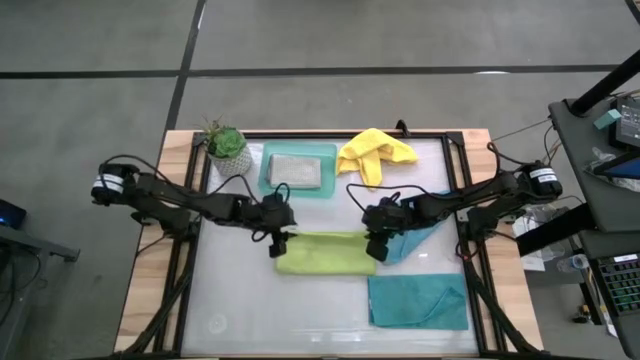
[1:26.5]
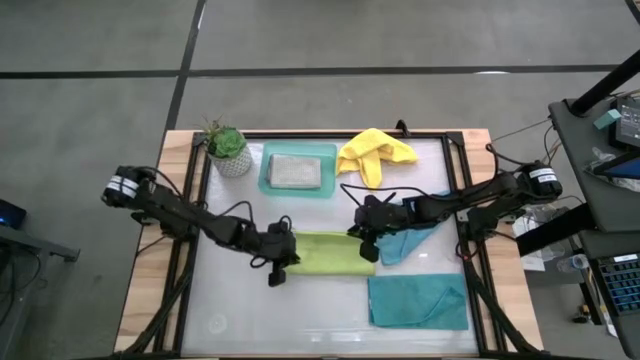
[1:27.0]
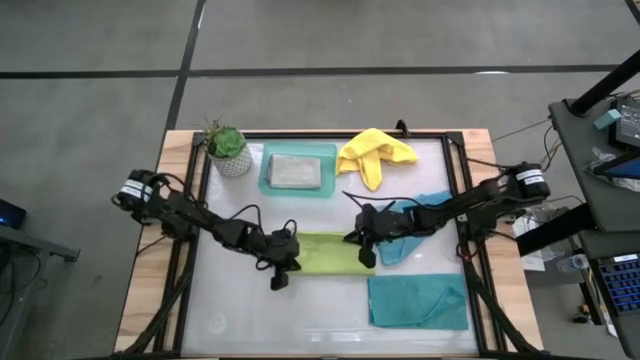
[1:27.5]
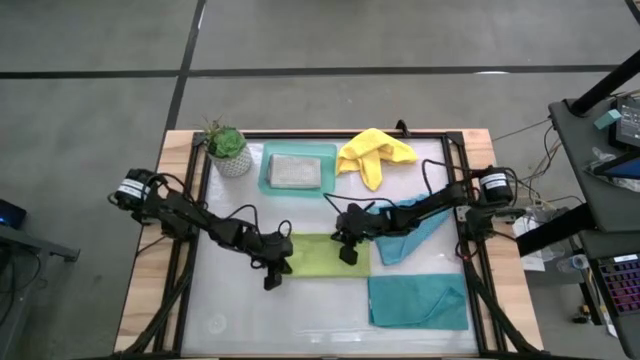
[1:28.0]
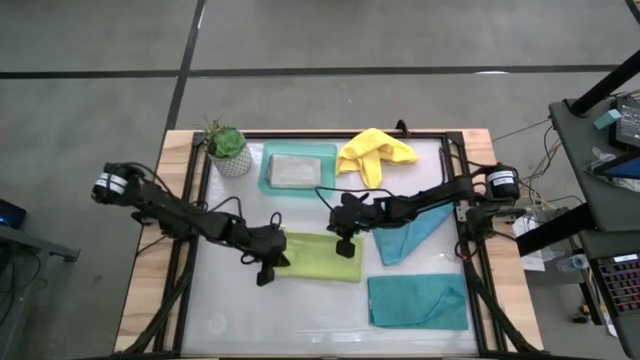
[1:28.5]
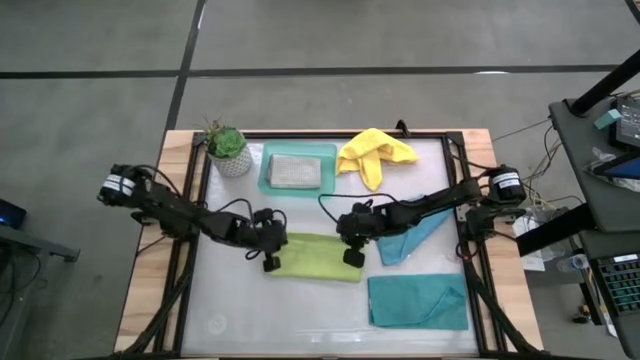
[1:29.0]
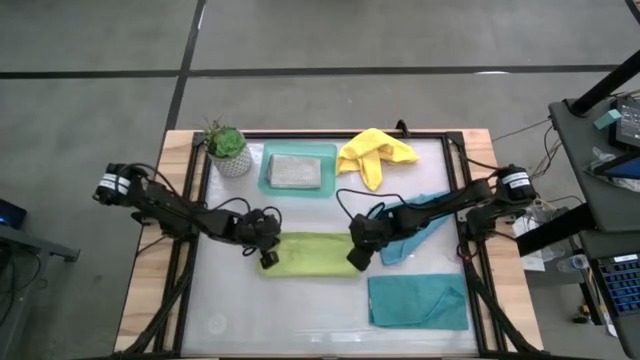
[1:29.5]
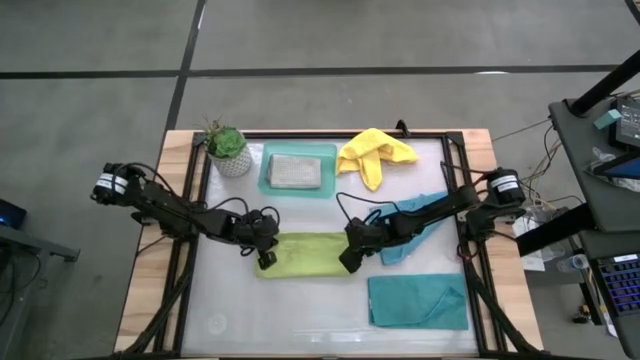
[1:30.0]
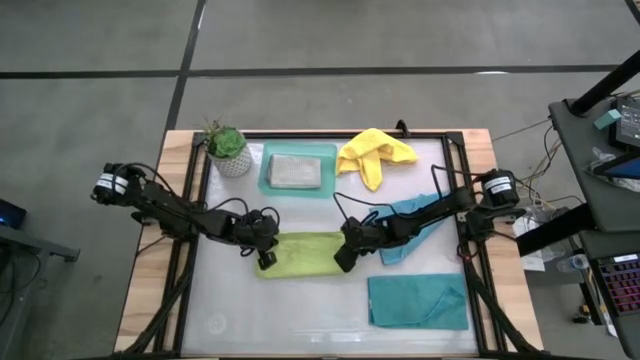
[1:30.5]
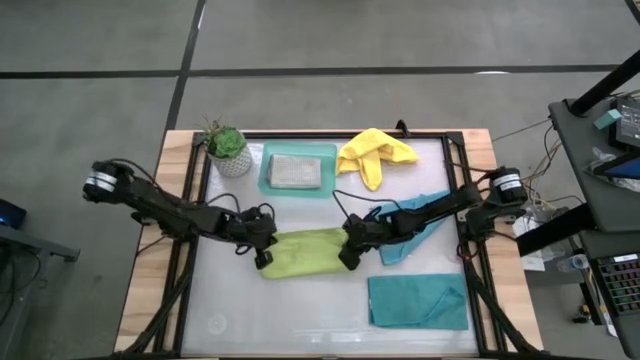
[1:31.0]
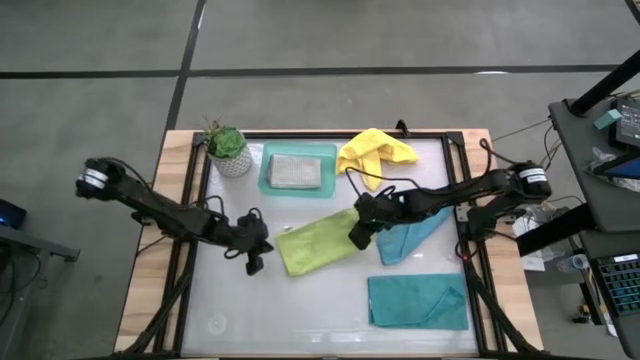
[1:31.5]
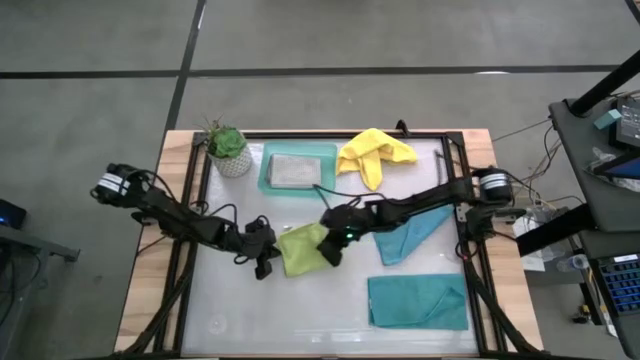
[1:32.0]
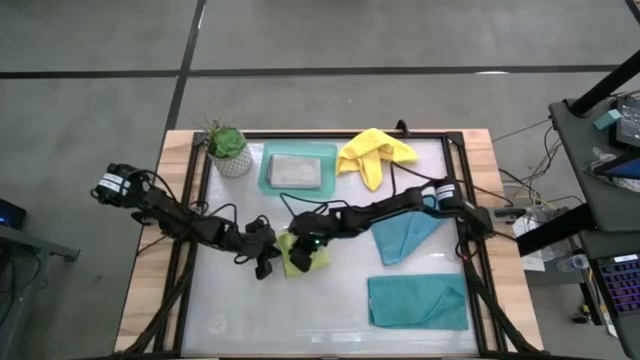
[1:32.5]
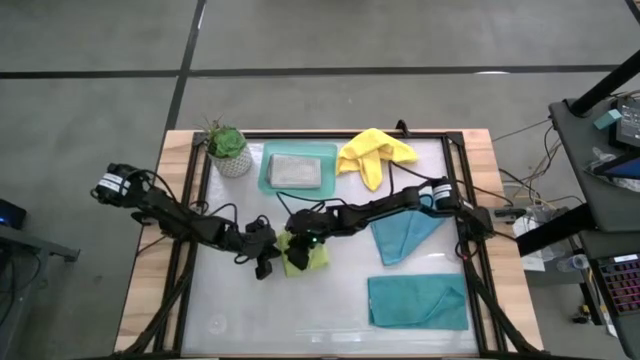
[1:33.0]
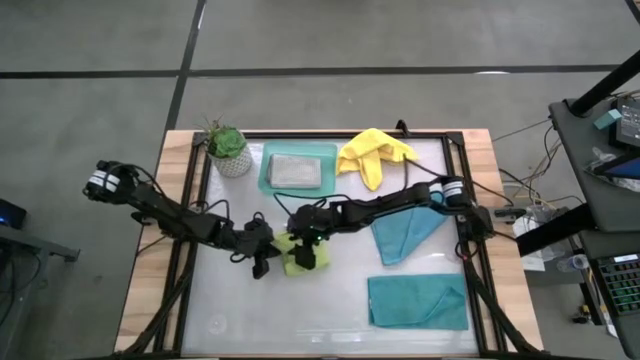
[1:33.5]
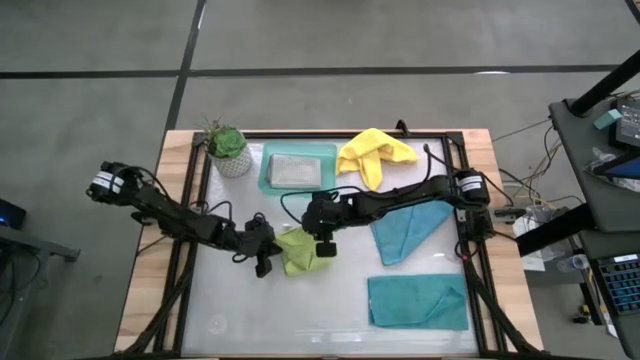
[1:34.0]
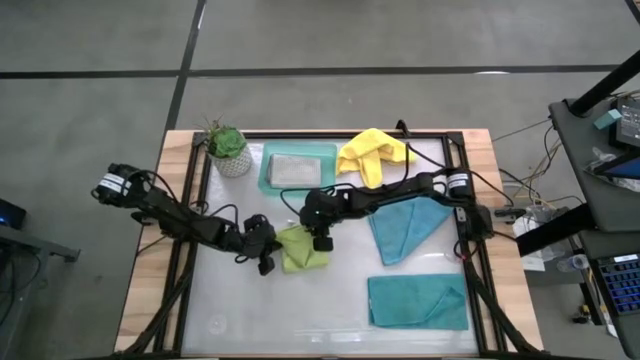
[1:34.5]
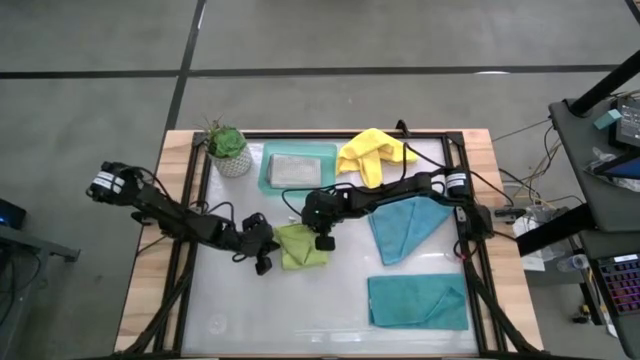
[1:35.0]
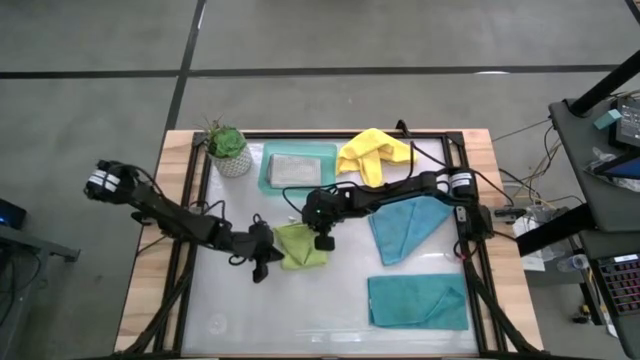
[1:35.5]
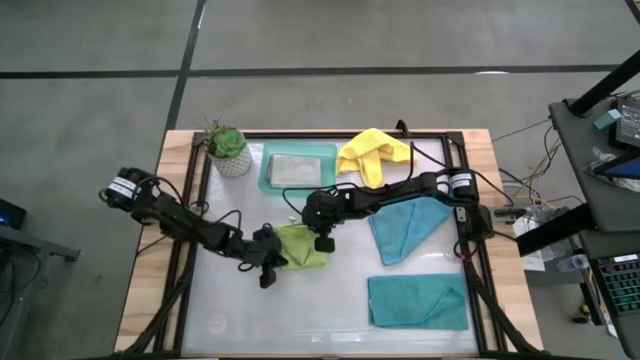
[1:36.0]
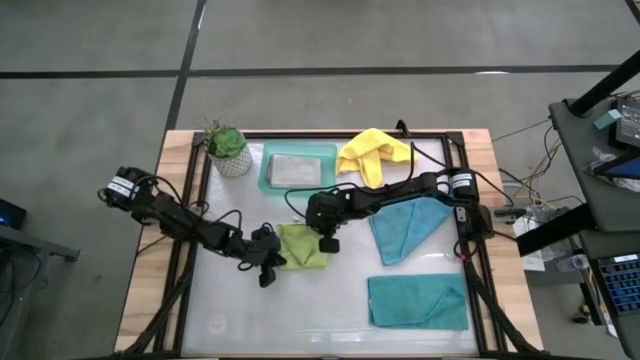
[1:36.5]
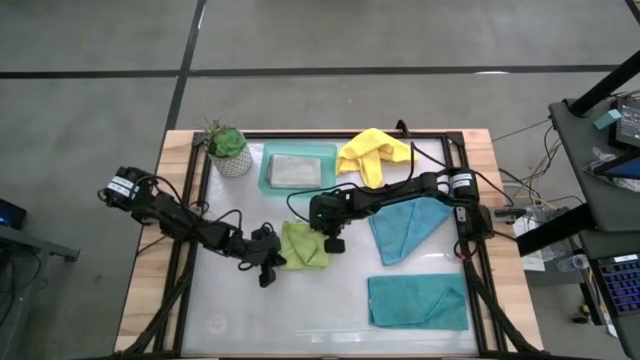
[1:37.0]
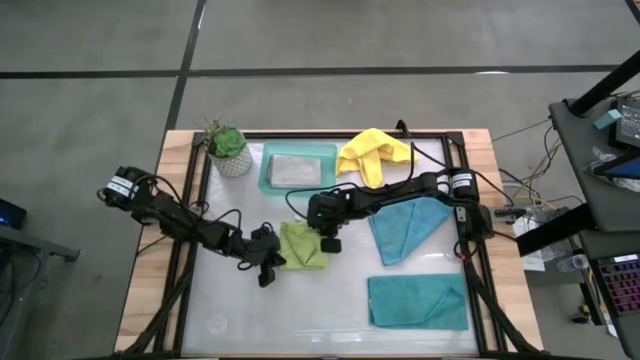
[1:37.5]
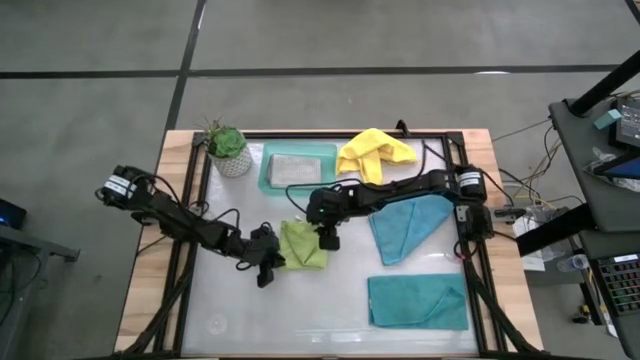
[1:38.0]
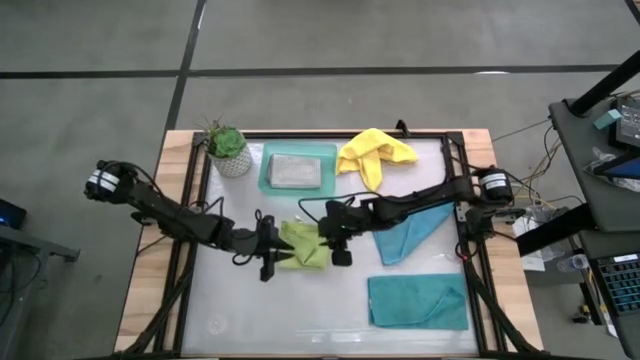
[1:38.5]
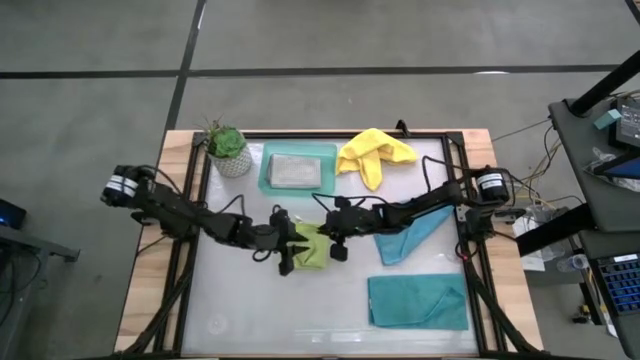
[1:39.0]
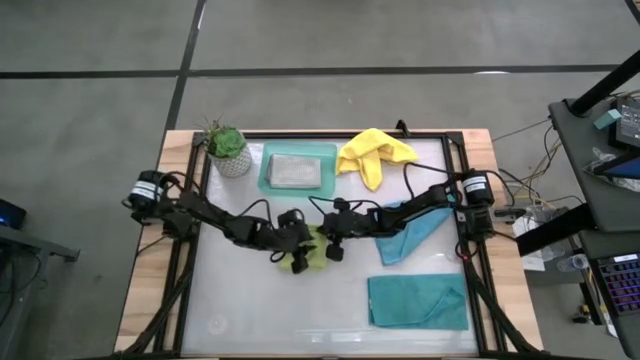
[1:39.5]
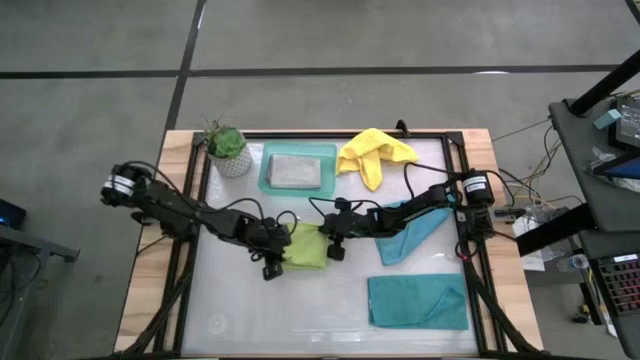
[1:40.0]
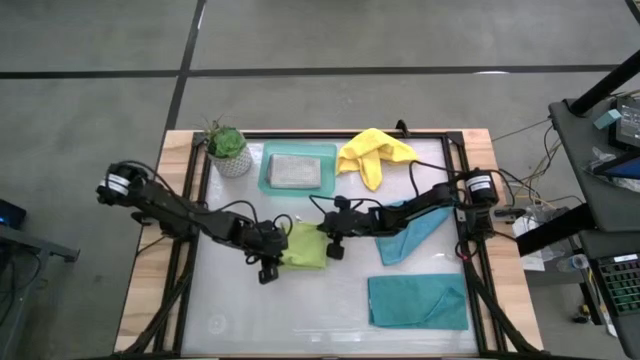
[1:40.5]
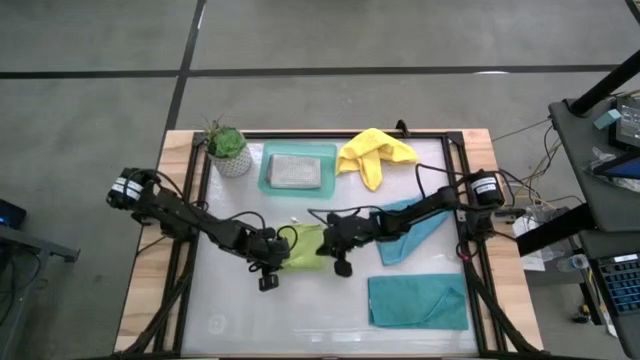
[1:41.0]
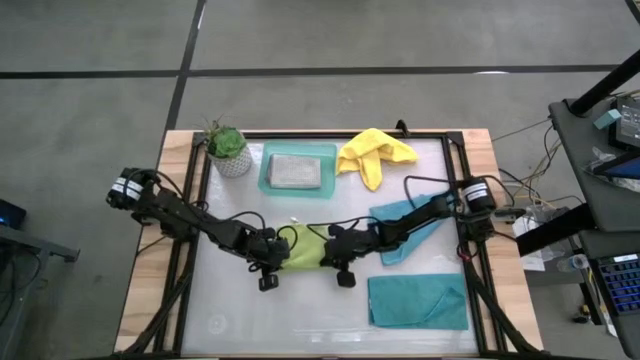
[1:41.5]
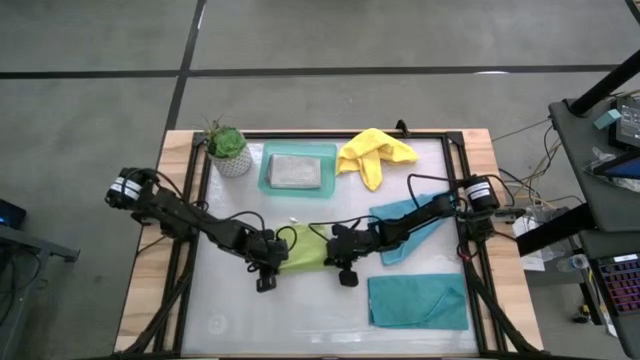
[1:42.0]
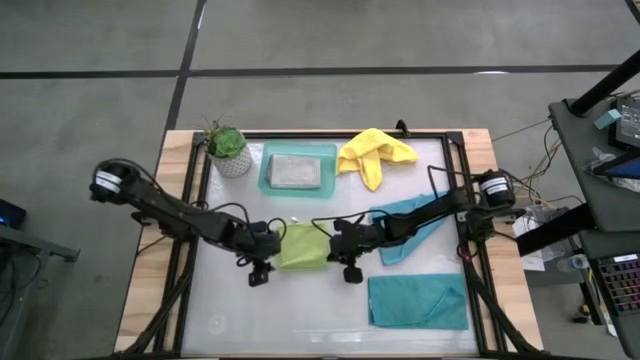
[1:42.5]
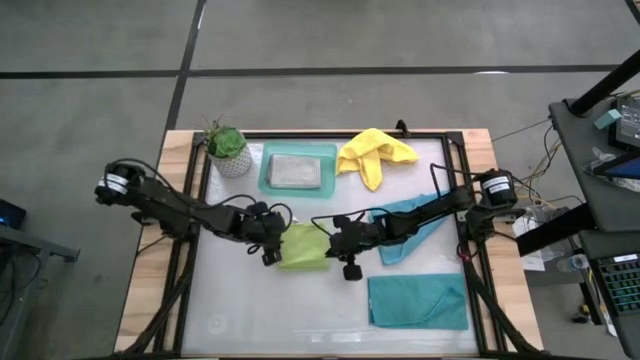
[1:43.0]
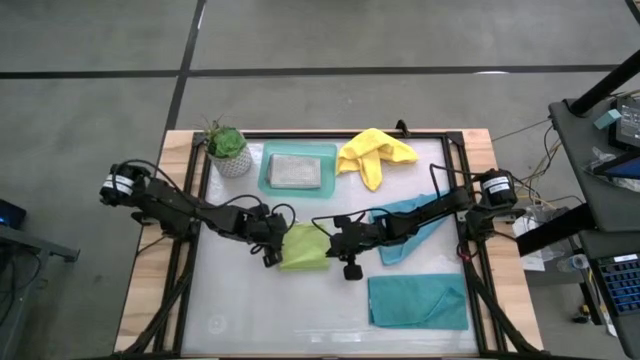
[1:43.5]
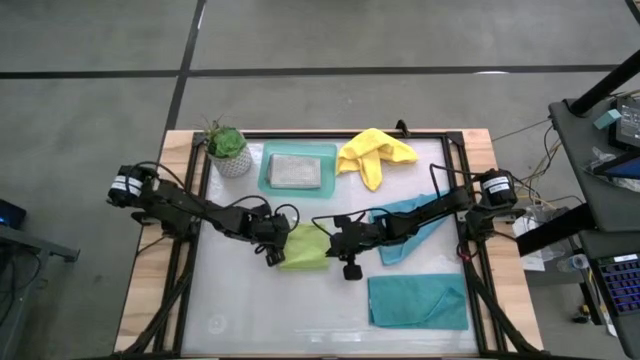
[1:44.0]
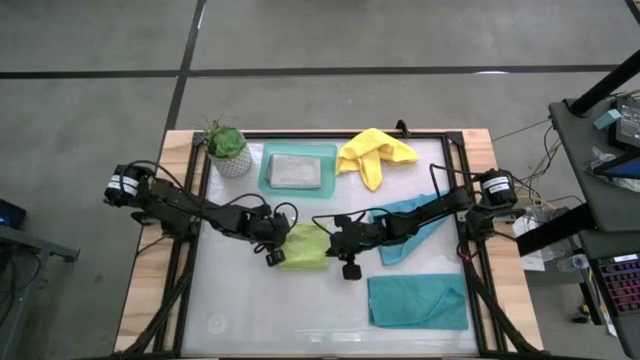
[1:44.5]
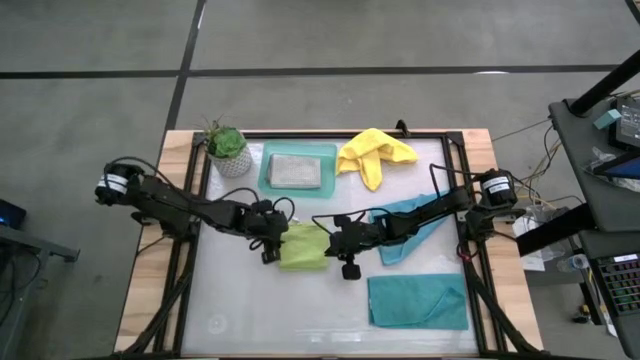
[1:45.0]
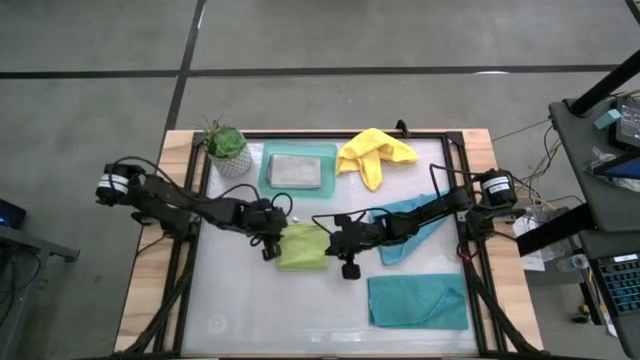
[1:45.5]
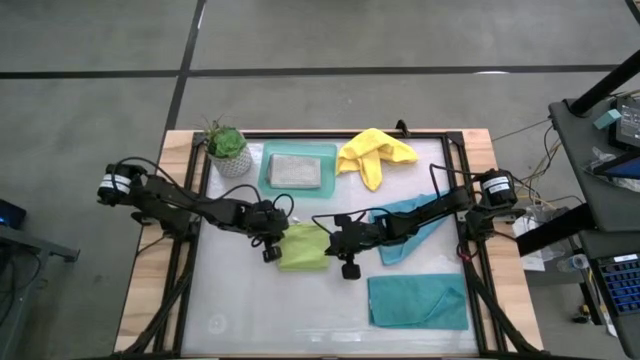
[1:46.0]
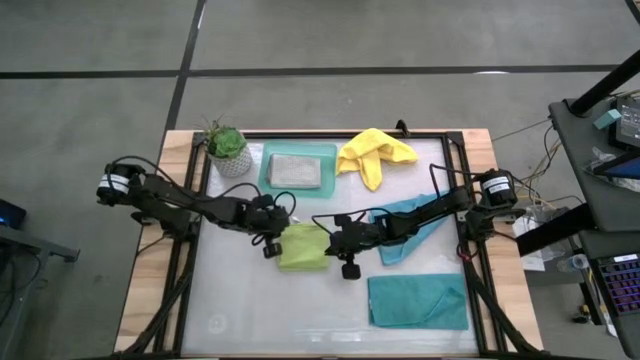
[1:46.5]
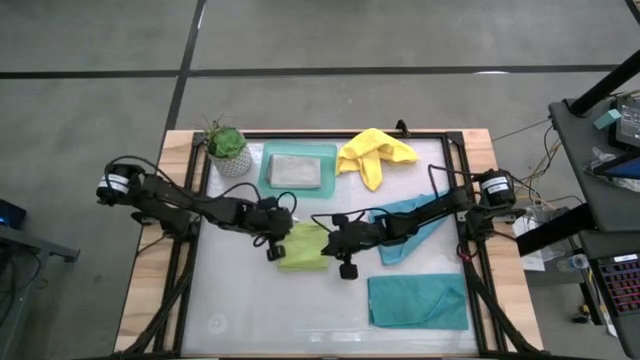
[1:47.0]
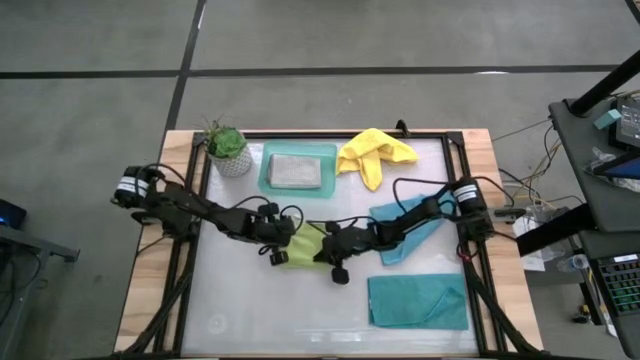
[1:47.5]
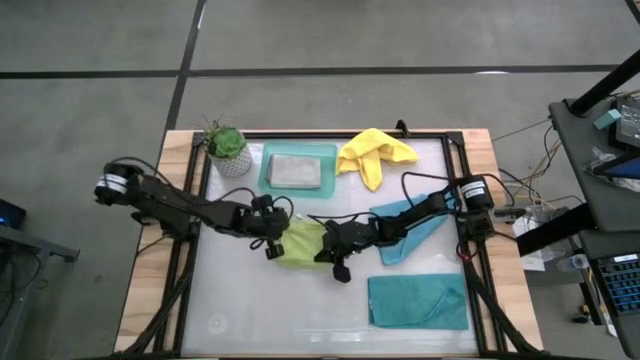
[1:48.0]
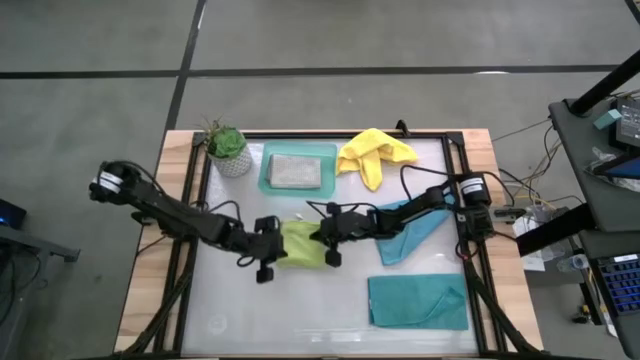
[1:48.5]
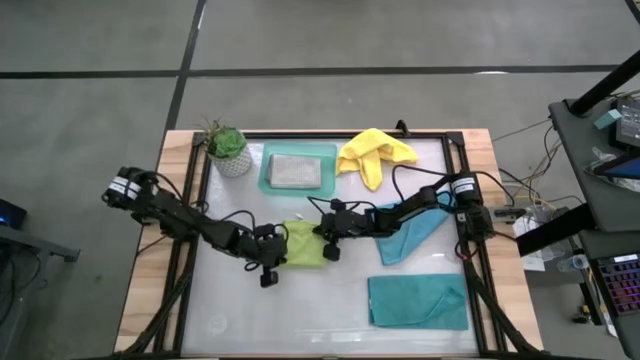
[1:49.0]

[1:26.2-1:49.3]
Task: Fold microfiber towels
Fold the green microfiber towel
